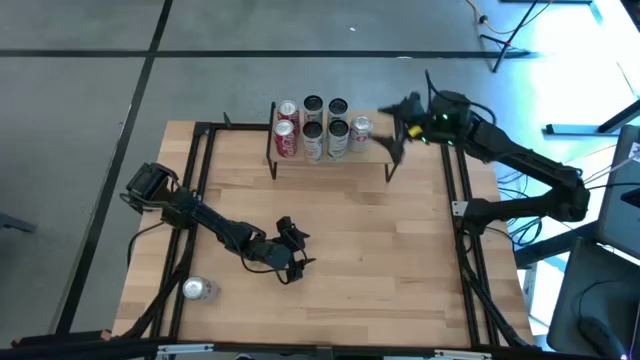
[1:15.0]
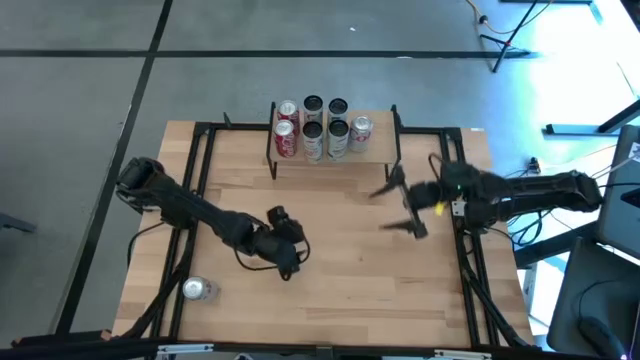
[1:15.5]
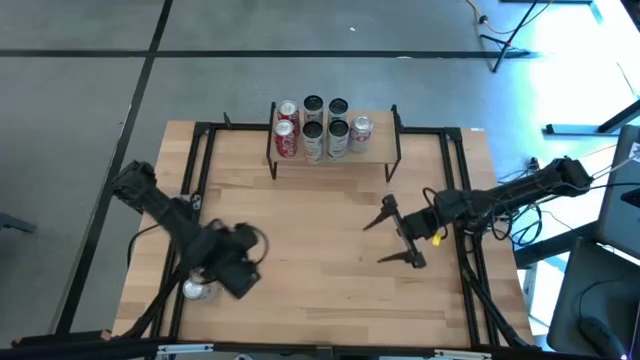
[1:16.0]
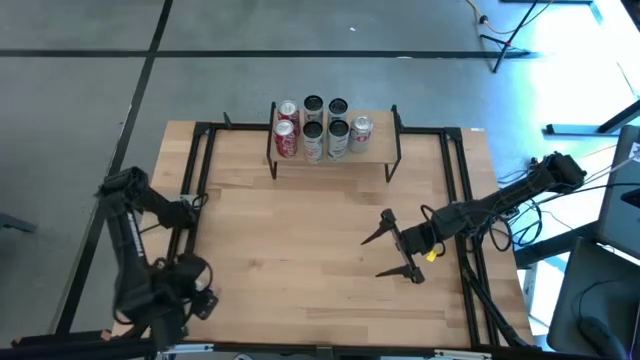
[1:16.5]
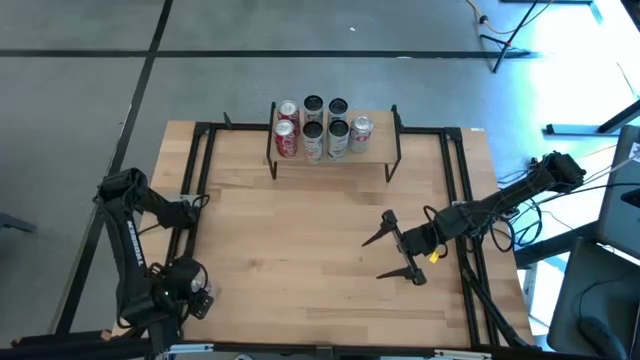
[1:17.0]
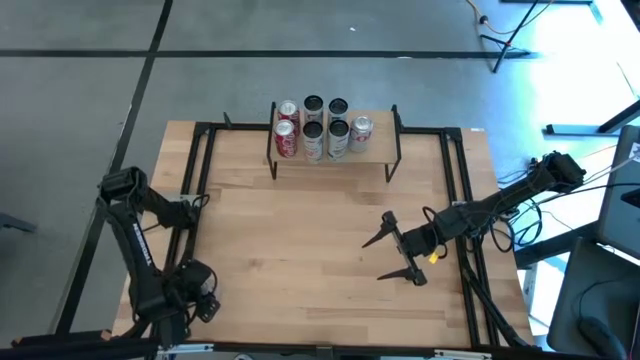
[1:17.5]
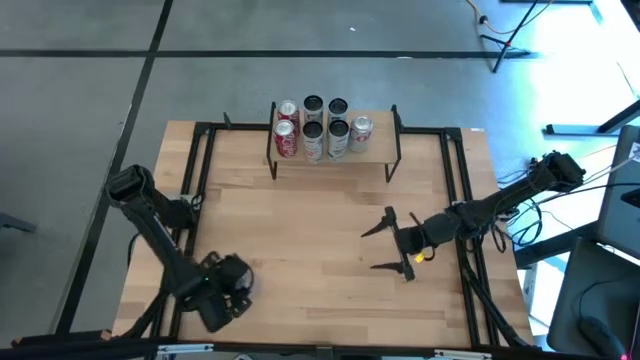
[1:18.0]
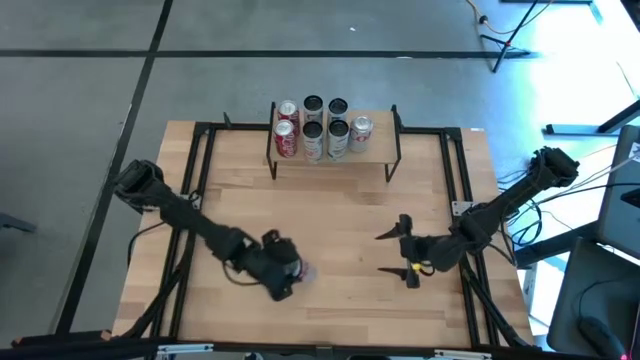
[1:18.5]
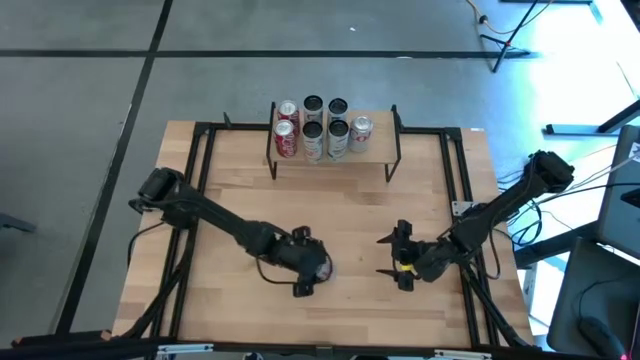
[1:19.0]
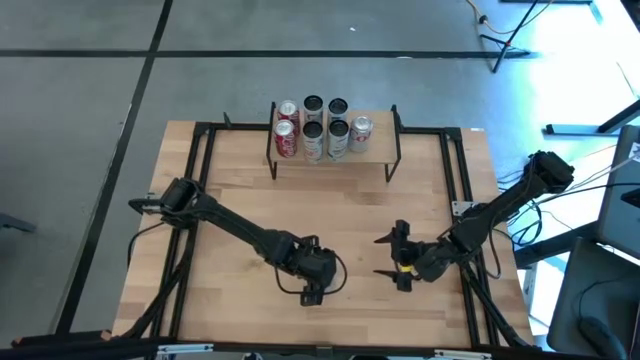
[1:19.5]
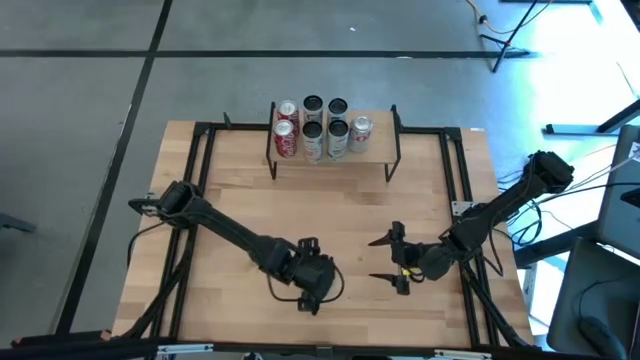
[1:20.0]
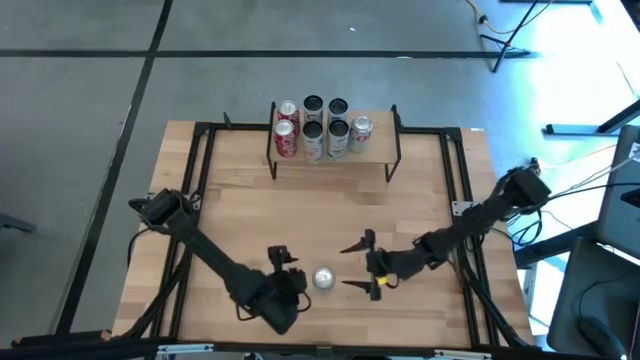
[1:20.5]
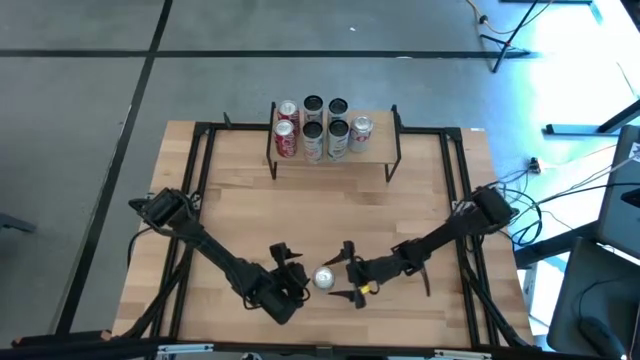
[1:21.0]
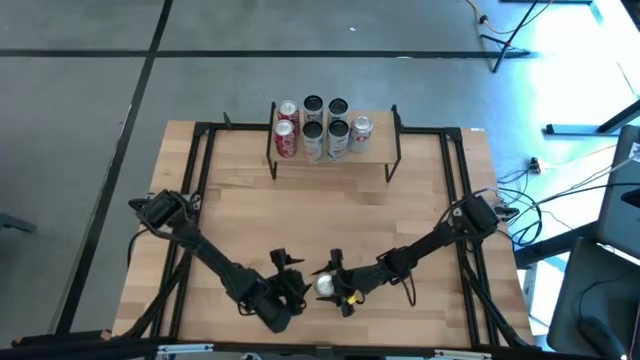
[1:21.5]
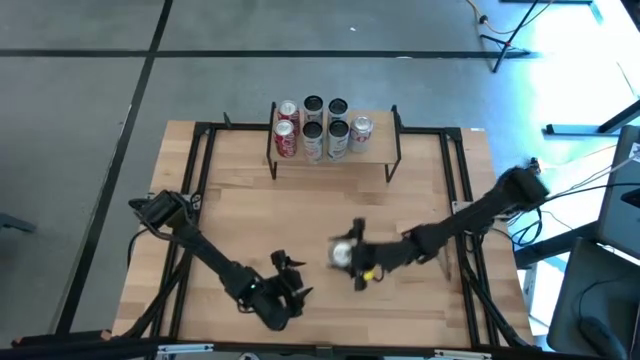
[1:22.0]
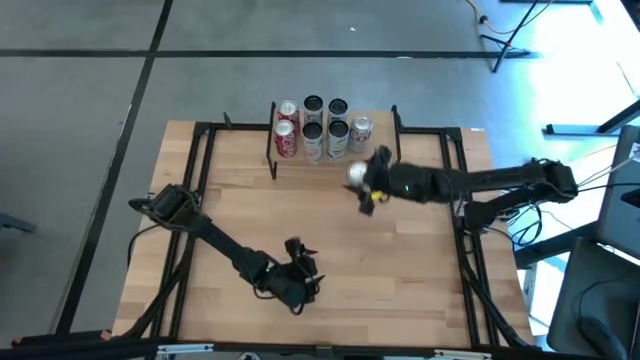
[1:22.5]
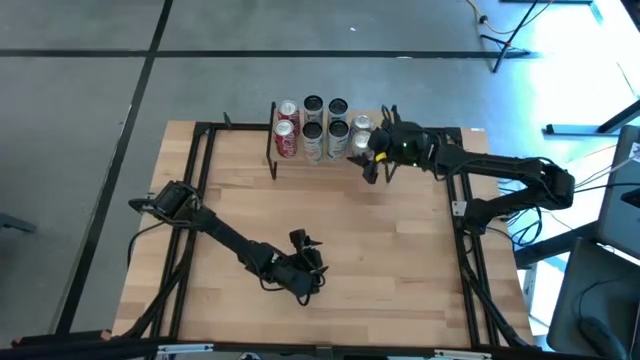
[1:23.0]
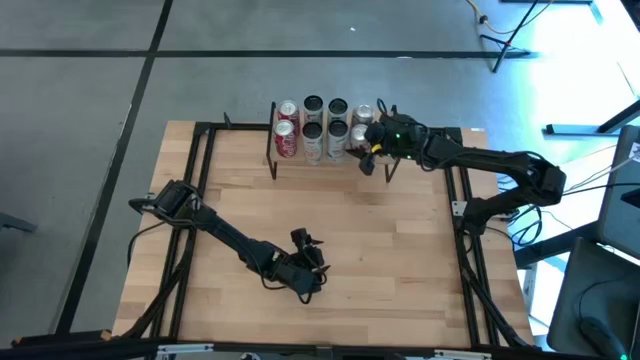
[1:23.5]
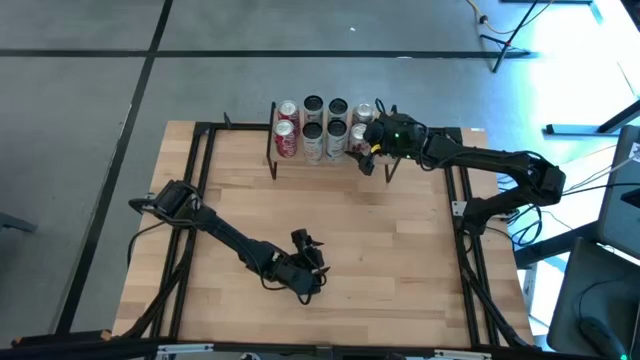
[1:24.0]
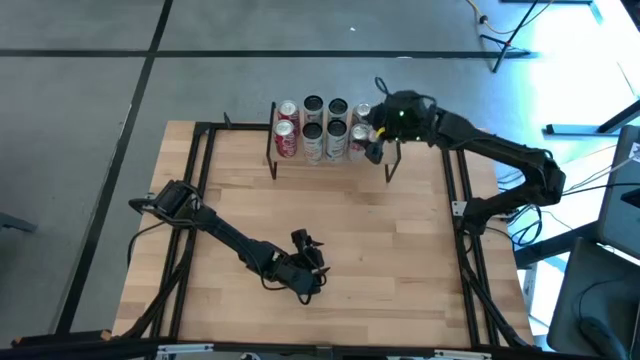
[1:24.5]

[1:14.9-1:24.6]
Task: Place canned beverage on shelf
Put the red-silver soda can on the shelf aligned with the other red-silver soda can on the shelf

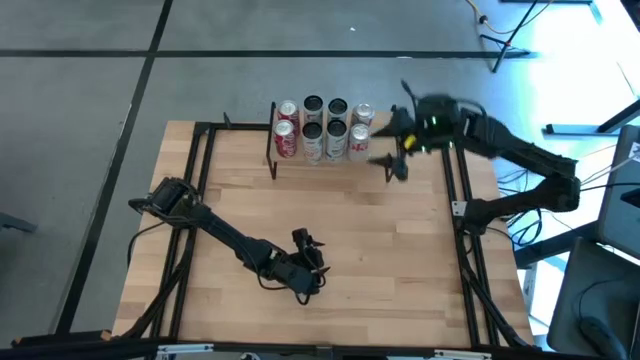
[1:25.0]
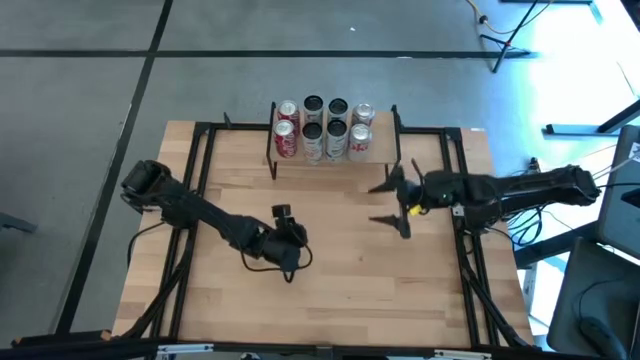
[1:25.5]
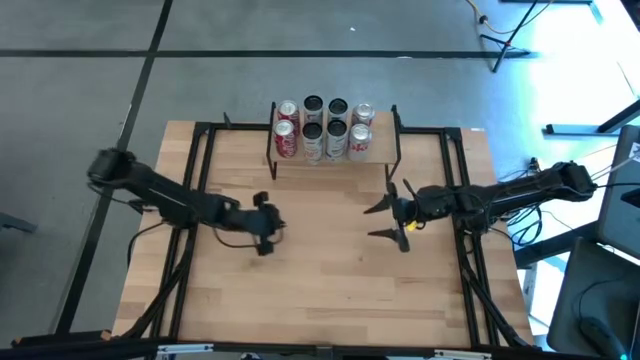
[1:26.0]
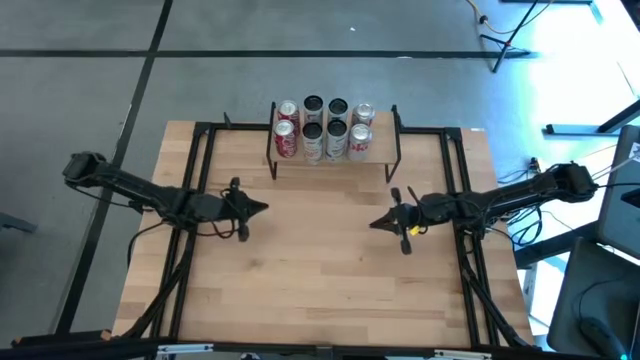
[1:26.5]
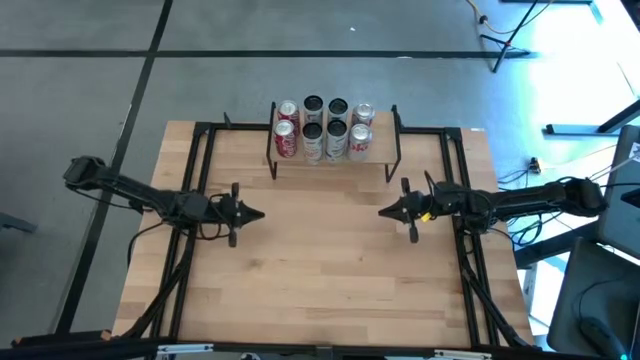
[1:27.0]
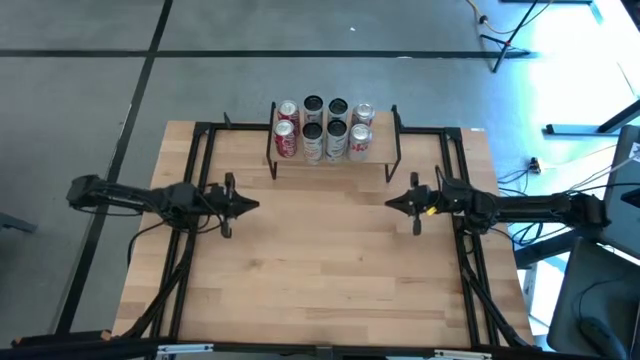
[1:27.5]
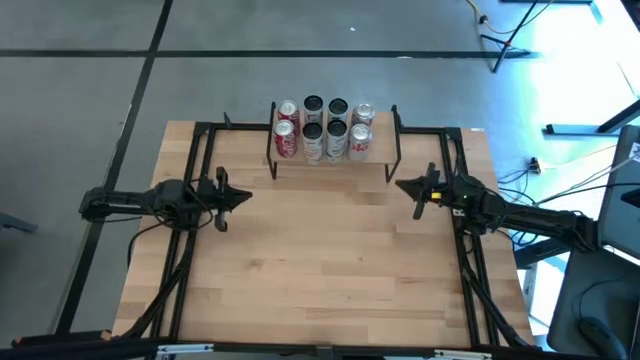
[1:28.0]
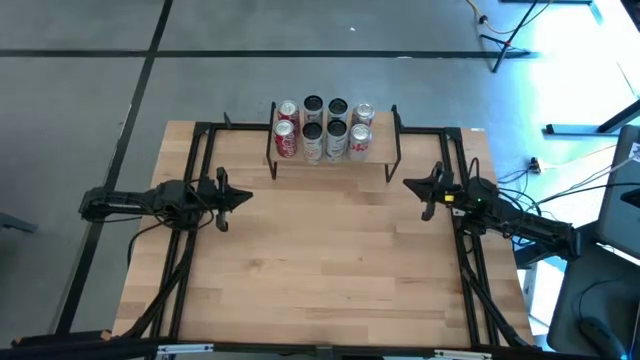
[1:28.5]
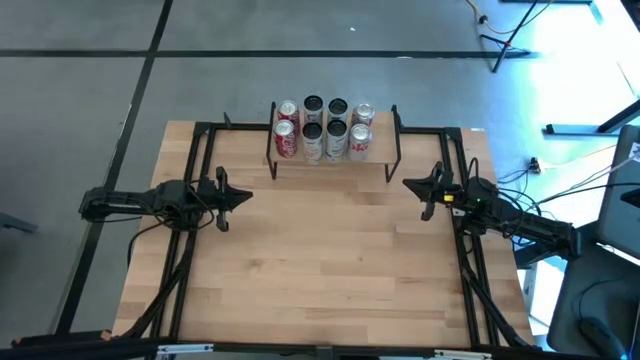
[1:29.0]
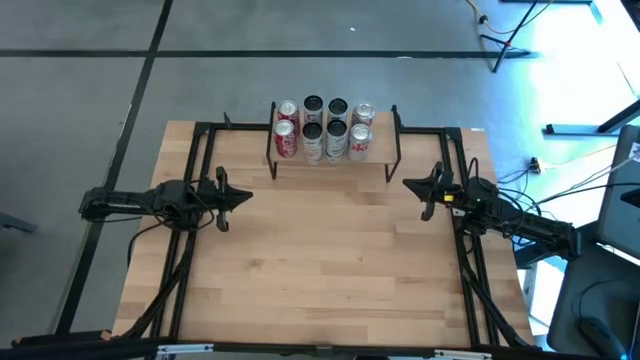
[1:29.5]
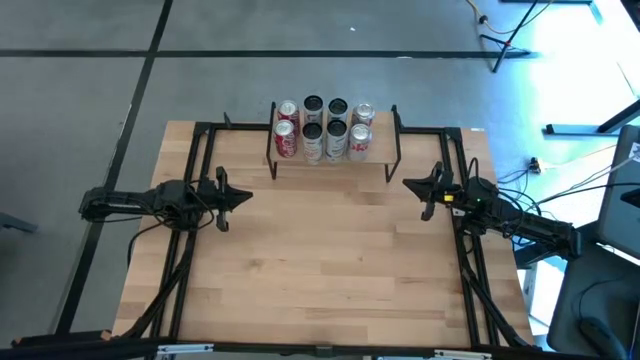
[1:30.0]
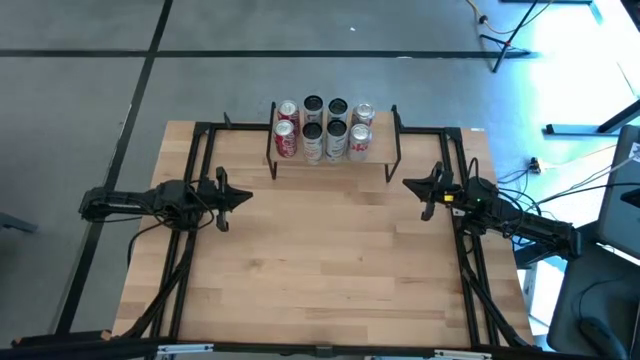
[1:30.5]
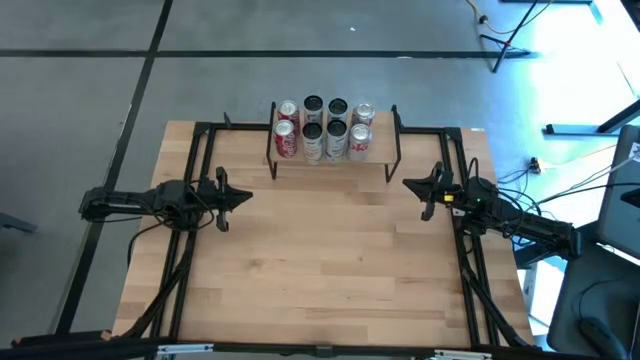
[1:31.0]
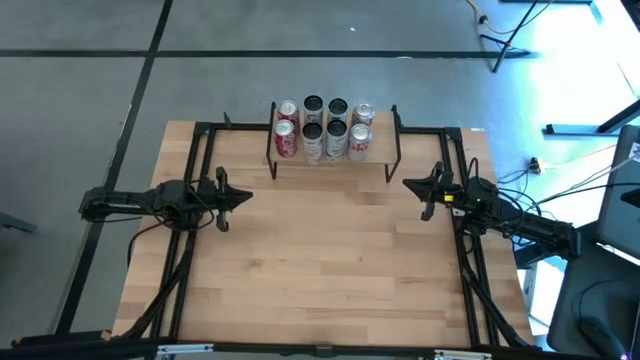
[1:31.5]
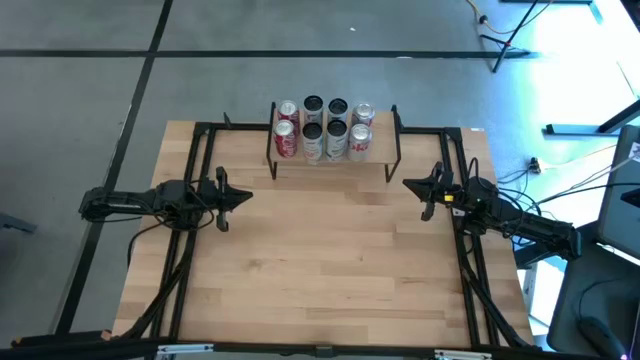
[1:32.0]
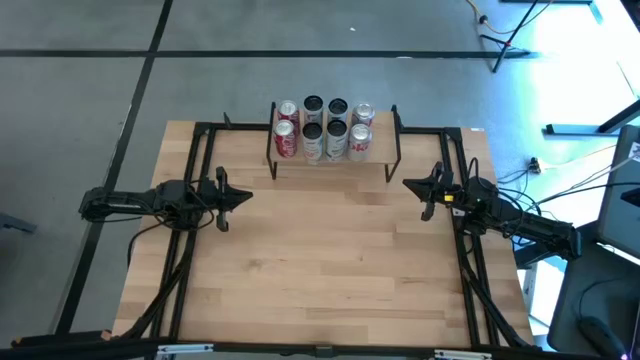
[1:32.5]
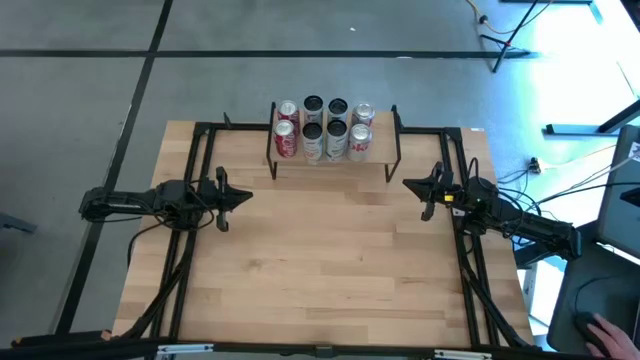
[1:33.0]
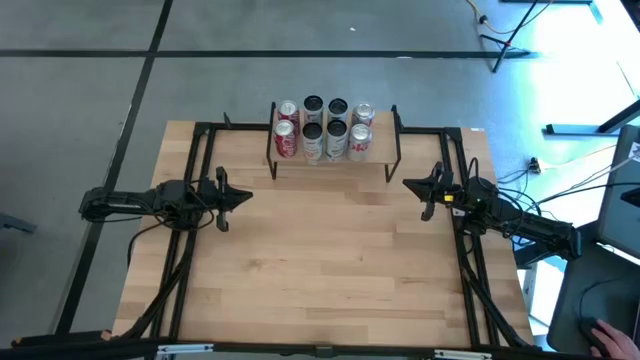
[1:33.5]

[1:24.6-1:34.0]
Return to Home Position

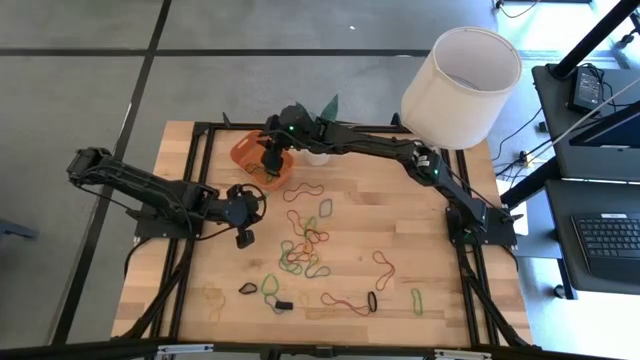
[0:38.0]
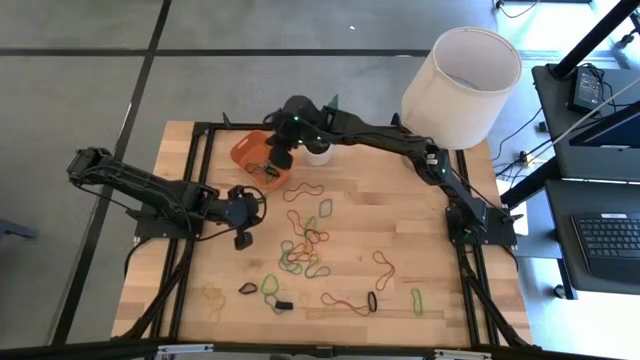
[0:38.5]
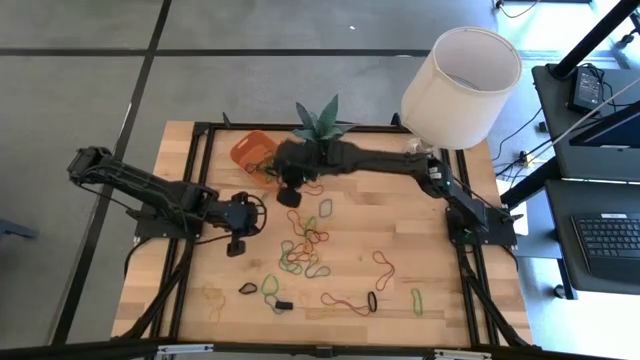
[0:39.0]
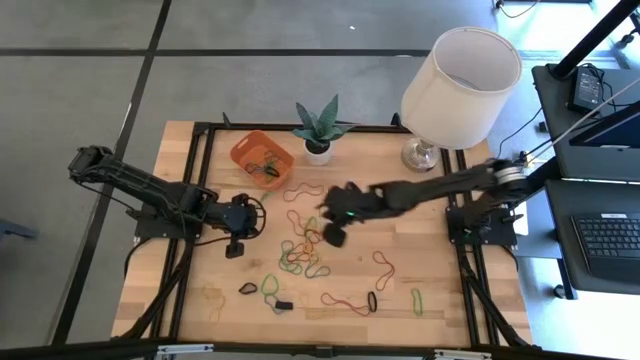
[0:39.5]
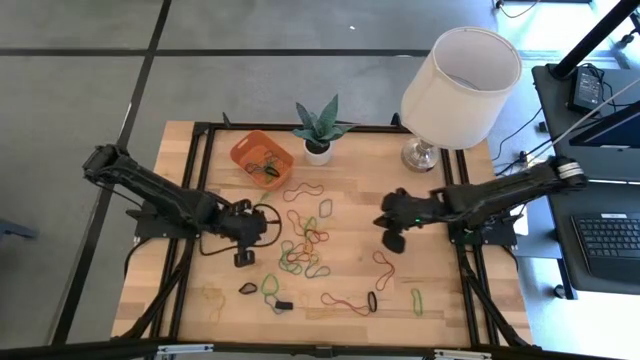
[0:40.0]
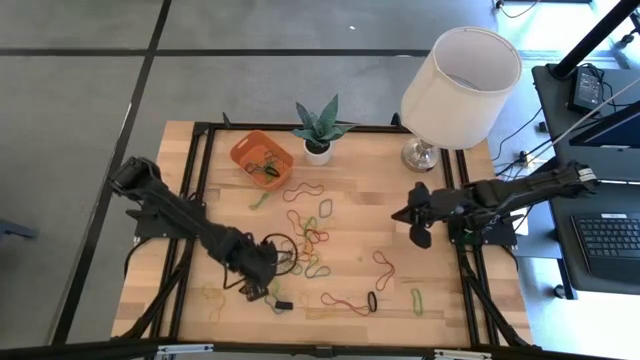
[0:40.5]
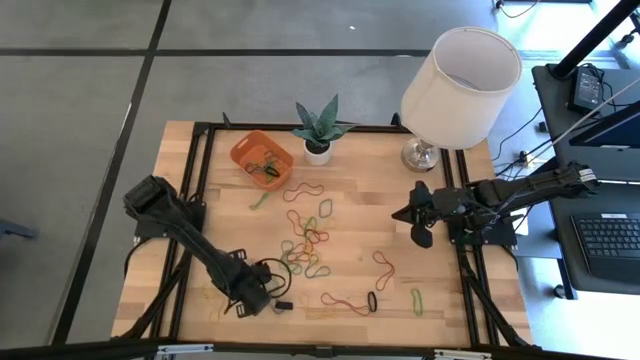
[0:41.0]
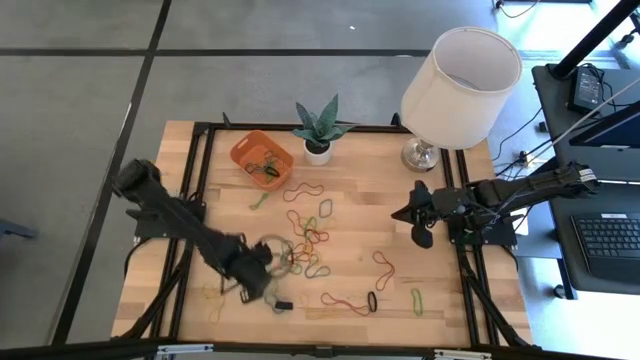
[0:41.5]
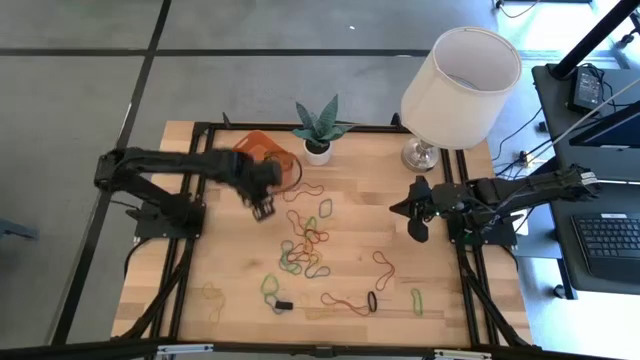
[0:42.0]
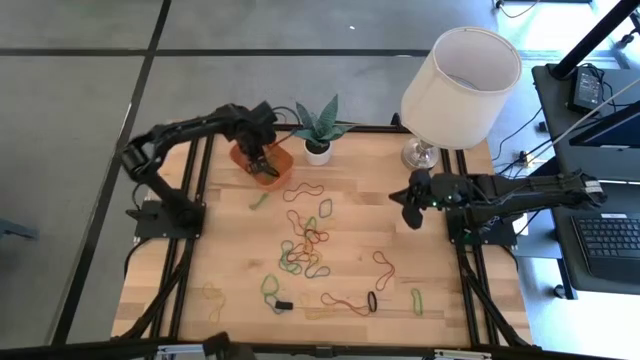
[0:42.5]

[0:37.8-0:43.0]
Task: Pick and place rubber bands into bin
Put the black rubber band into the orange bin
